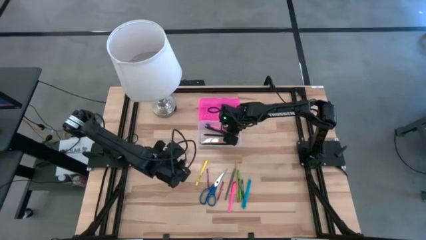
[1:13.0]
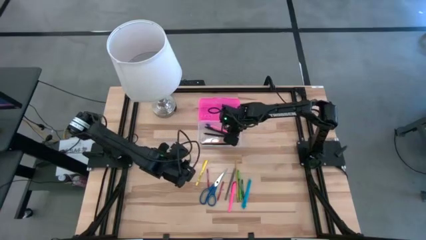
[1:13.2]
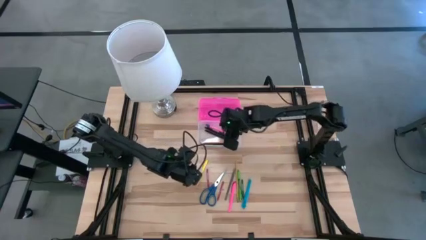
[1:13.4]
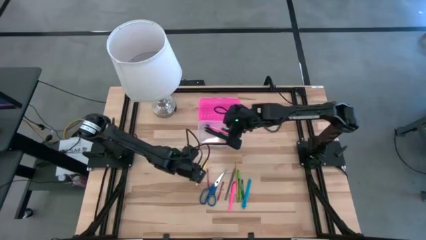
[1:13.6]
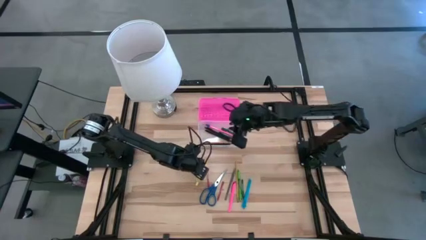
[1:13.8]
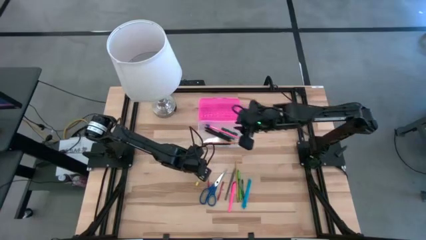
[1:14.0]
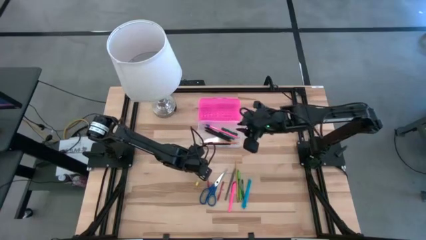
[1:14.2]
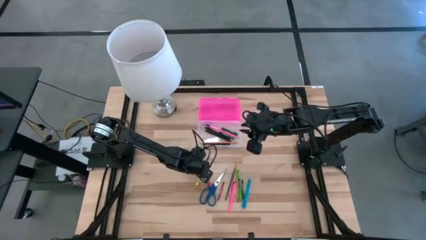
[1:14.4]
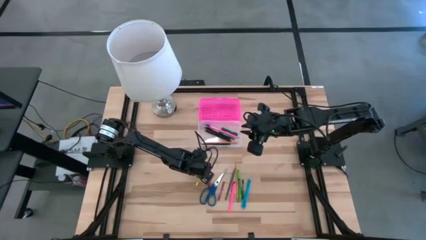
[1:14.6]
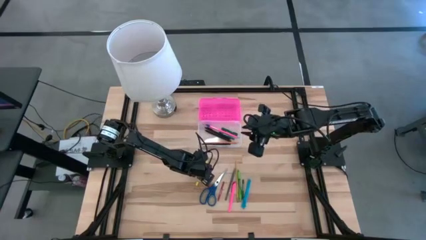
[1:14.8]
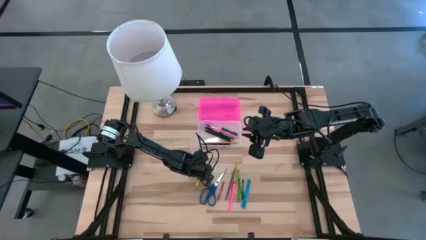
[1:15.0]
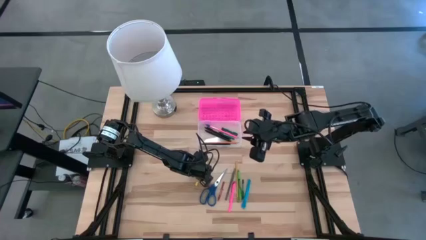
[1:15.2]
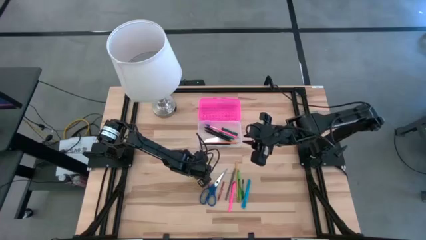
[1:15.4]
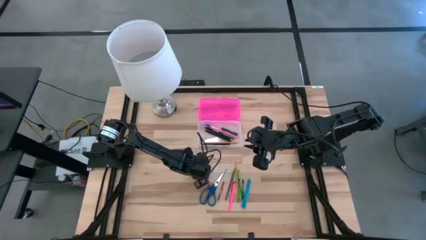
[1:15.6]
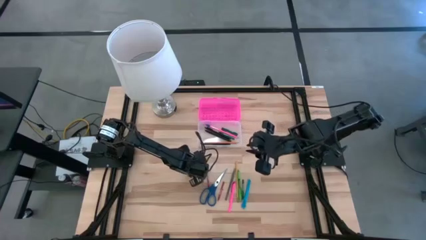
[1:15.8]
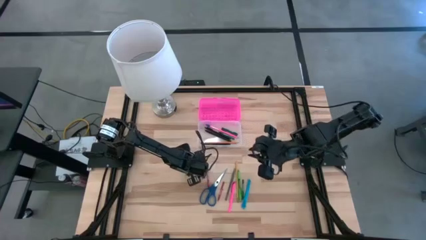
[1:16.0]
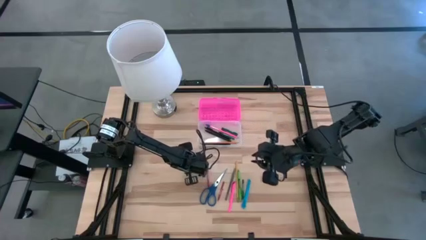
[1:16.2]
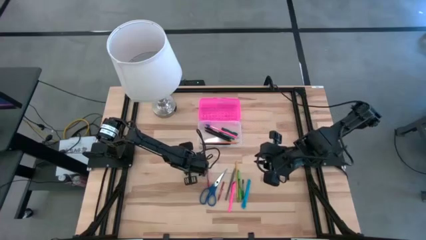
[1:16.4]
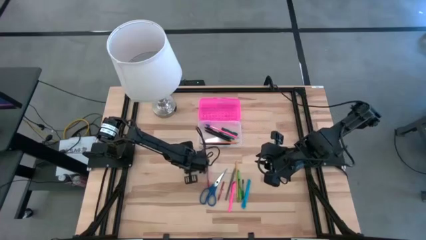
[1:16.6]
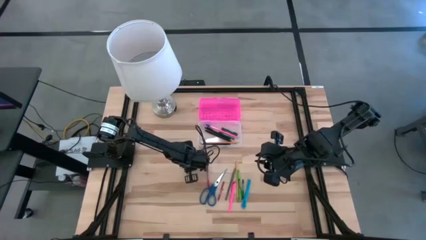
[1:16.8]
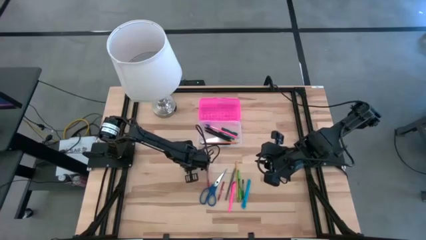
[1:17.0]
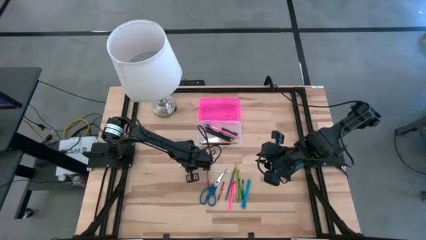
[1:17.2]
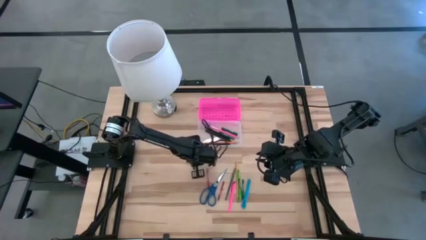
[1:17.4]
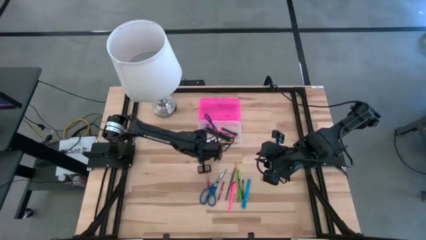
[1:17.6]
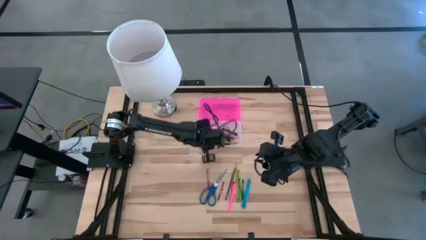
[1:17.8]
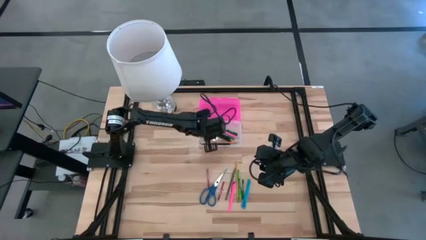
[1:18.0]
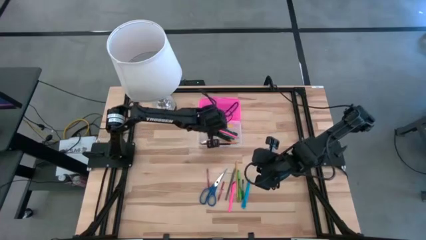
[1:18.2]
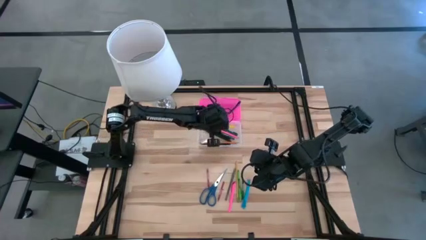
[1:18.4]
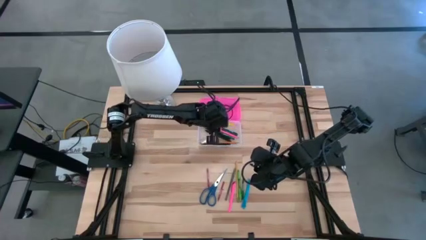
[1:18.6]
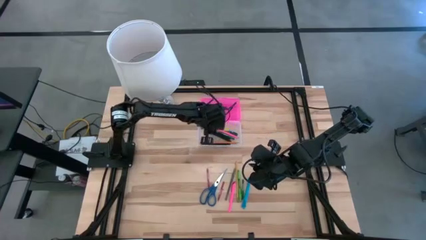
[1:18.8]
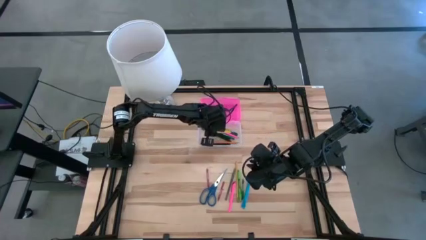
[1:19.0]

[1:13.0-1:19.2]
Task: Pick & place school supplies into a supply box
Put the yellow highlighter into the pink supply box

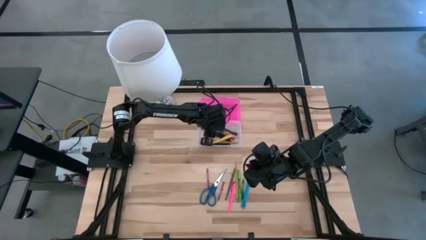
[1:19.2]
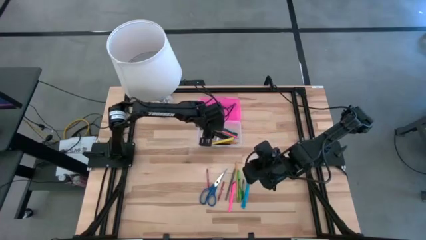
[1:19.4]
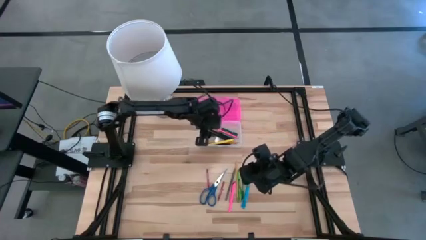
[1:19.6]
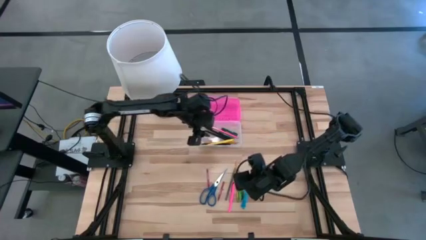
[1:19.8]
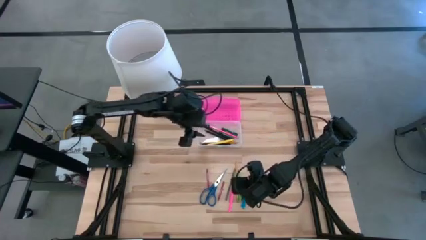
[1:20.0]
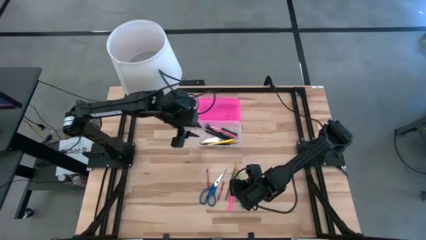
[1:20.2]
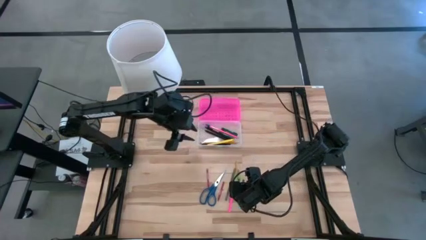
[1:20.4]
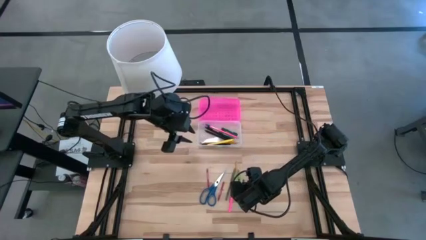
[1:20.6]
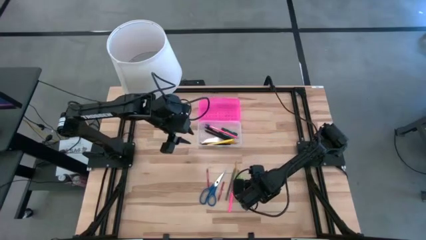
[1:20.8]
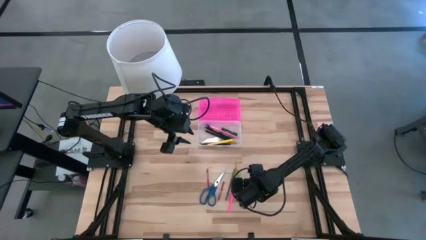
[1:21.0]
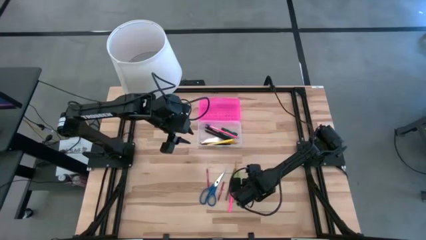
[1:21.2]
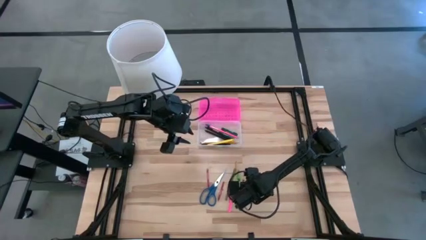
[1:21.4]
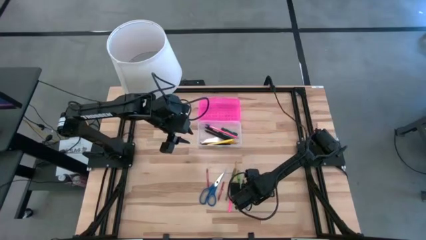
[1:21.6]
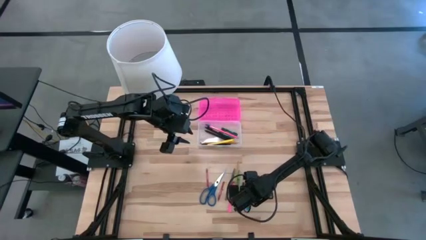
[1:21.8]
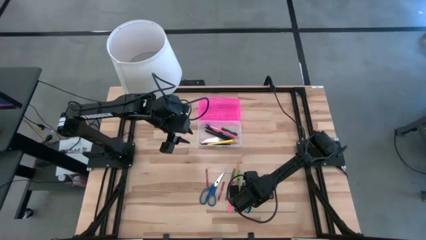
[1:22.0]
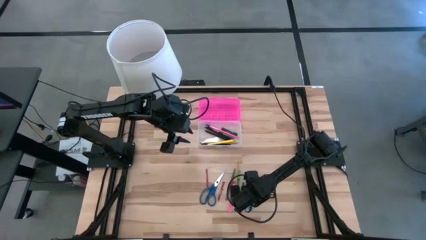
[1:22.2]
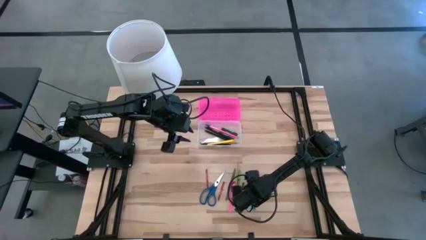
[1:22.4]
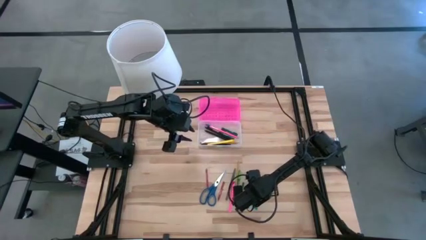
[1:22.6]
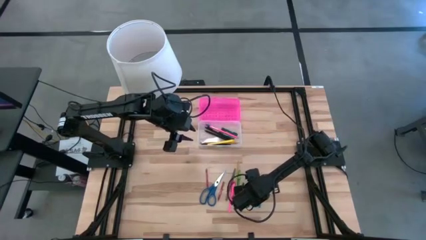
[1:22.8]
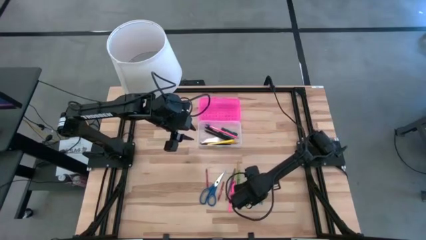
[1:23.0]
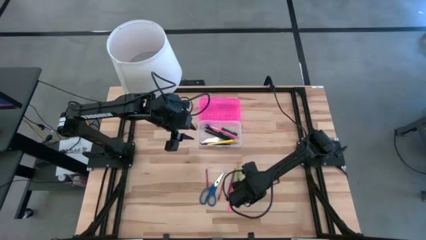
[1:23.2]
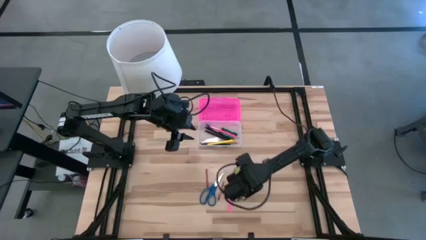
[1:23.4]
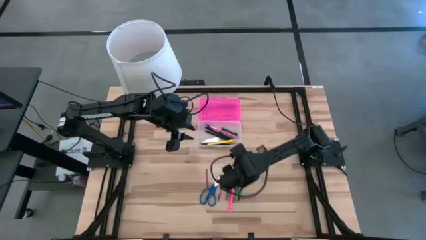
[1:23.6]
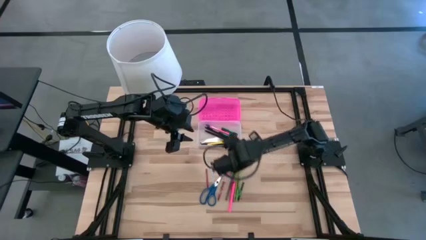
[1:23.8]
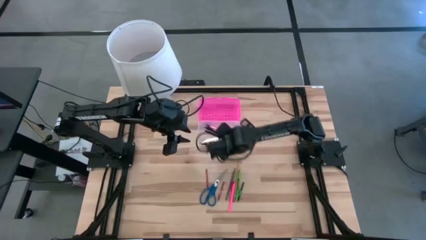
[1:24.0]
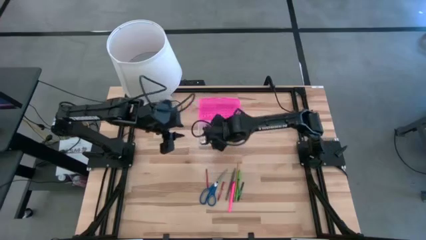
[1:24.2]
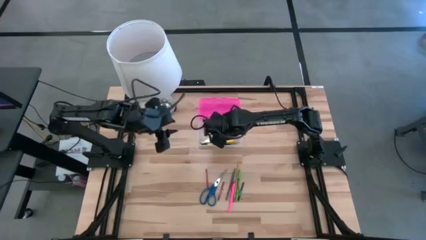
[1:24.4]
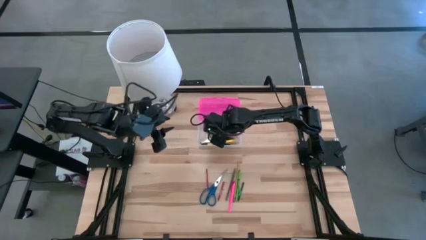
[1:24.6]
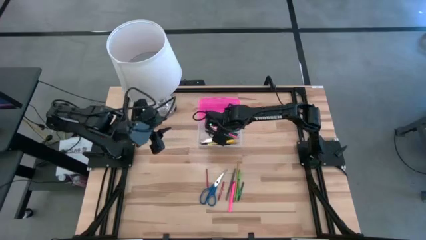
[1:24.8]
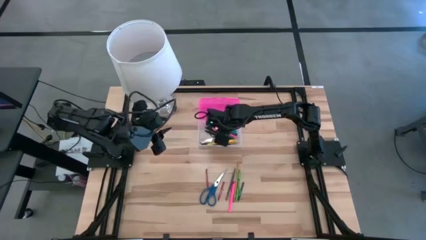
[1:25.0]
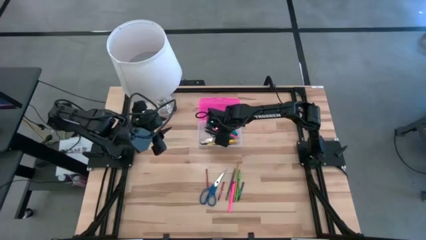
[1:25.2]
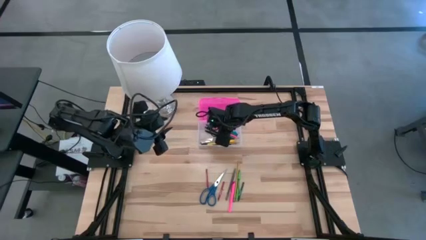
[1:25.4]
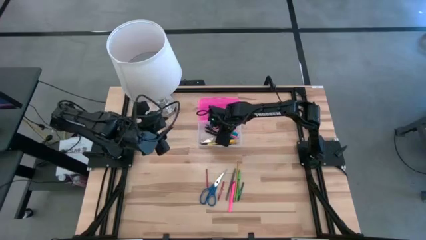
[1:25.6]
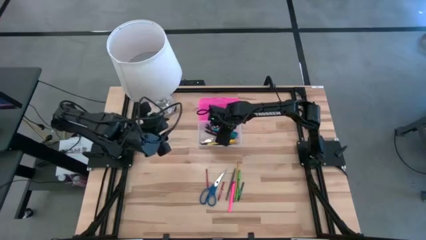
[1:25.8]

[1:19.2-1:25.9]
Put the blue pen into the pink supply box

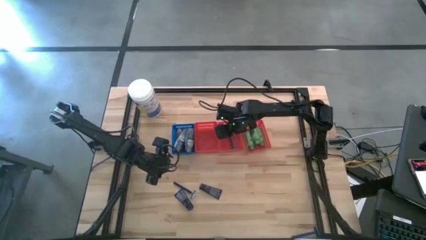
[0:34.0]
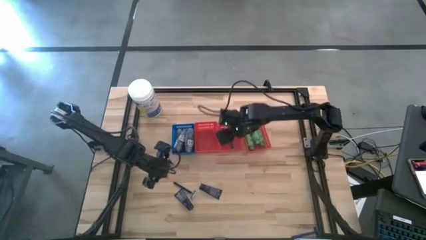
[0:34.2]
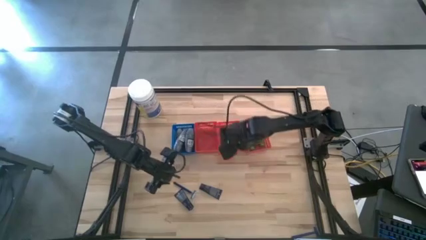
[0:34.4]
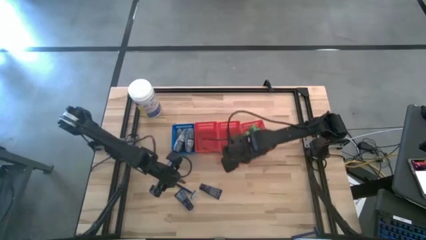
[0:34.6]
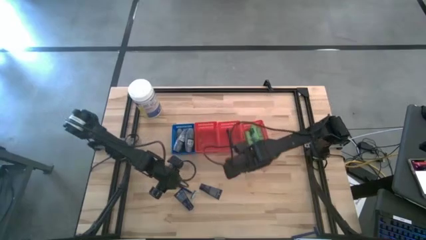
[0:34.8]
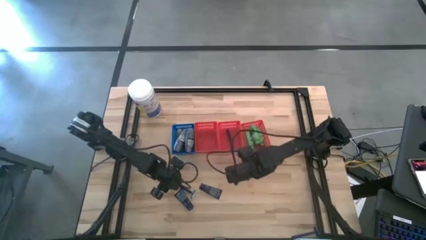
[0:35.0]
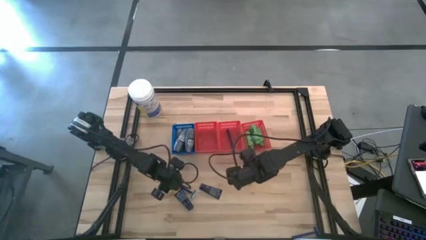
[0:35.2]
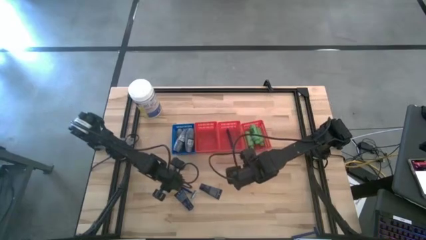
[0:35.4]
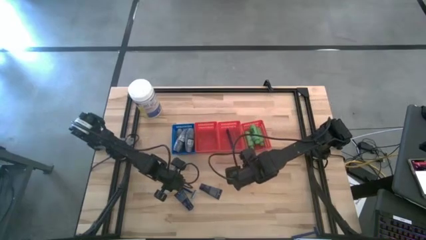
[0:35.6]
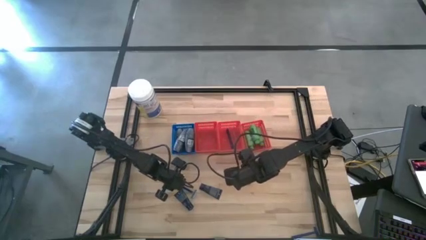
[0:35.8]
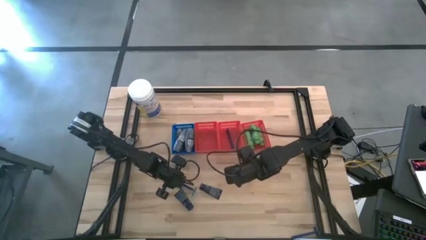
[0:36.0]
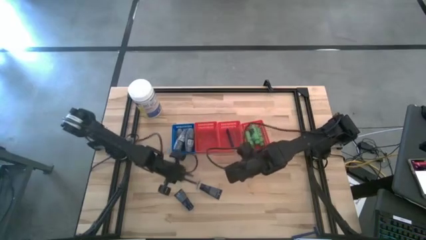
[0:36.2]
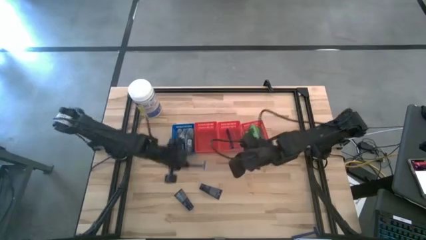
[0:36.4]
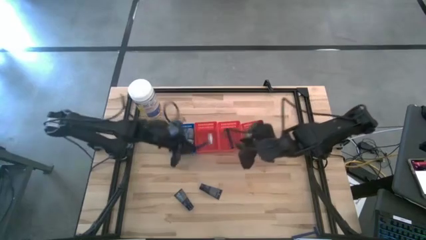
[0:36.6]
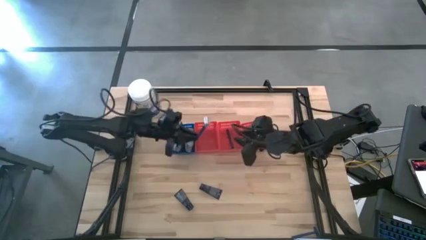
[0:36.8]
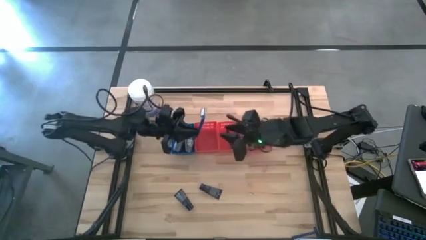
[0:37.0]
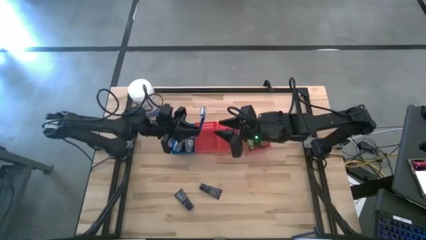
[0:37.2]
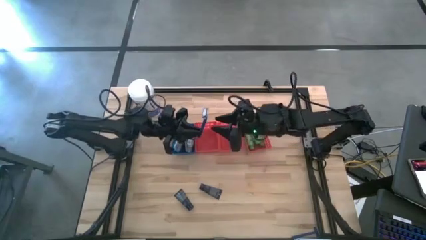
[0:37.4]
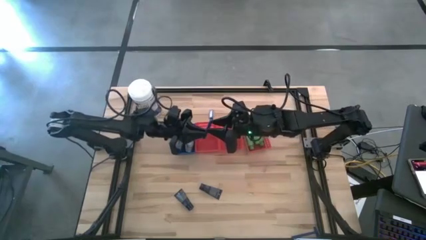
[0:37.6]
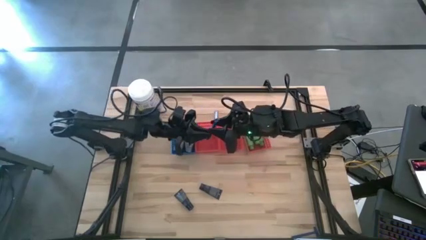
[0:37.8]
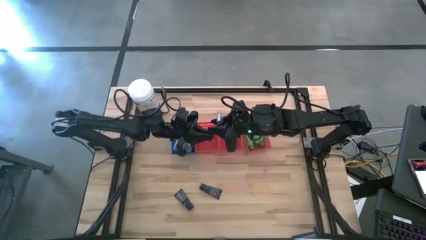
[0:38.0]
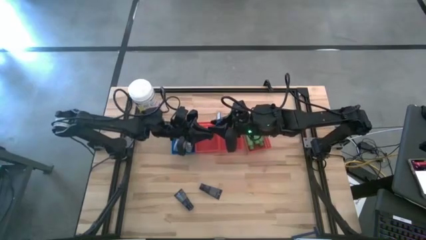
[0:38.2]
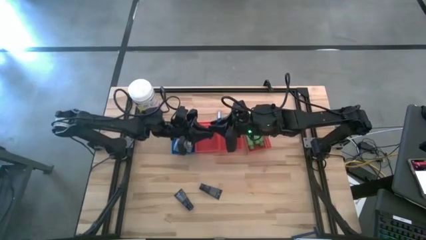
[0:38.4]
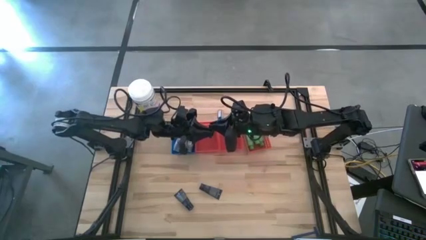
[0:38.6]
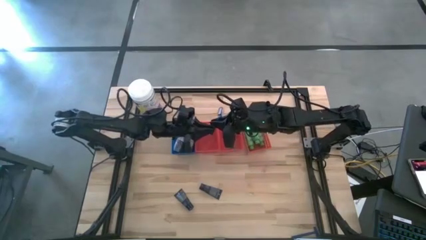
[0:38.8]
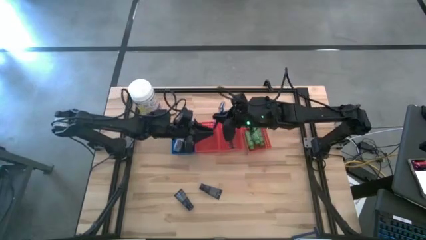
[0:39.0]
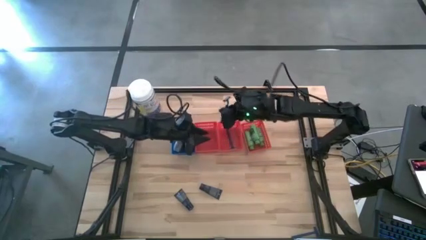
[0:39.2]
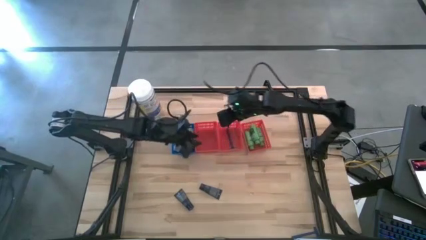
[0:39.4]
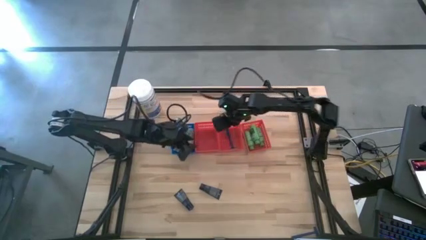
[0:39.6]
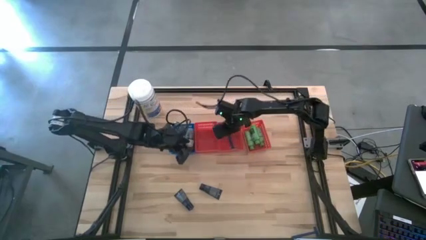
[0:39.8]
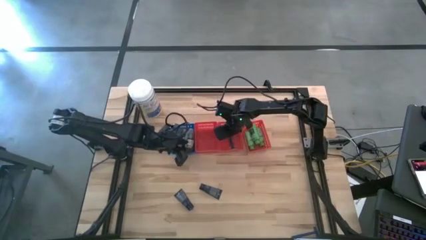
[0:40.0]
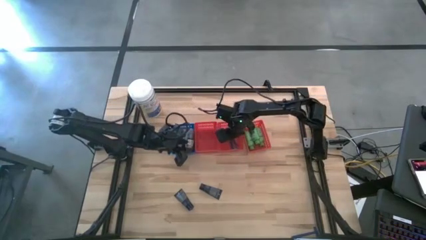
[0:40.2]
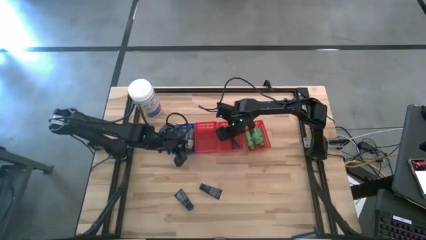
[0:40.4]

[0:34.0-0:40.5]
Task: Pick & Place Travel size toiletries
Put the razor into the middle red bin
